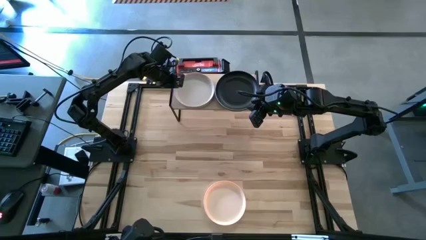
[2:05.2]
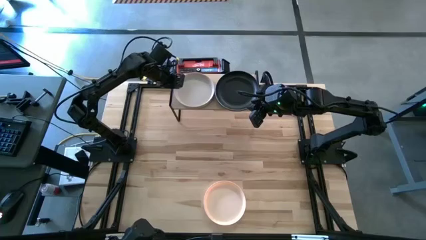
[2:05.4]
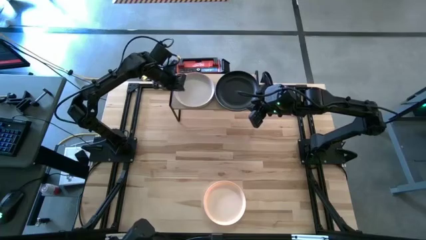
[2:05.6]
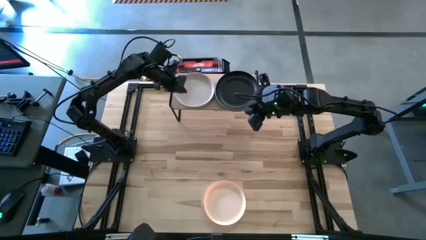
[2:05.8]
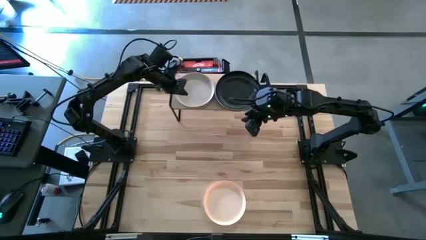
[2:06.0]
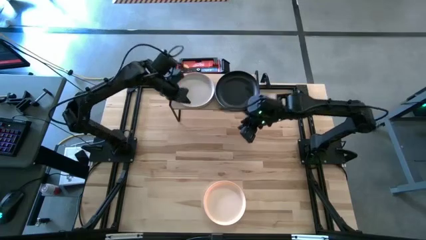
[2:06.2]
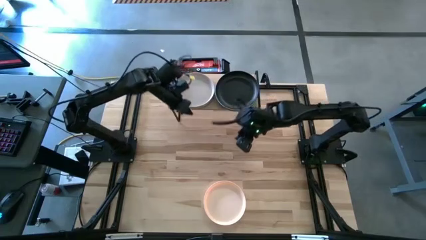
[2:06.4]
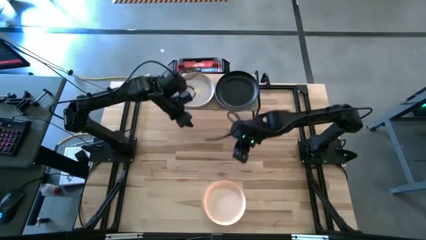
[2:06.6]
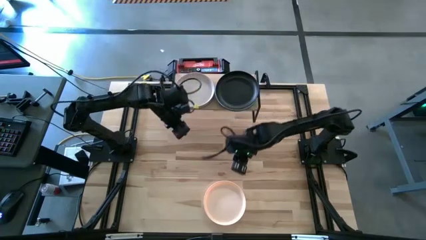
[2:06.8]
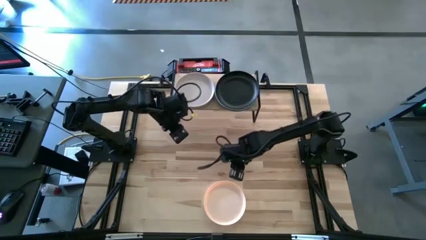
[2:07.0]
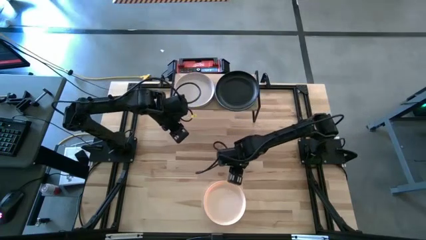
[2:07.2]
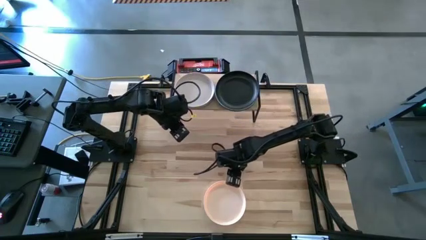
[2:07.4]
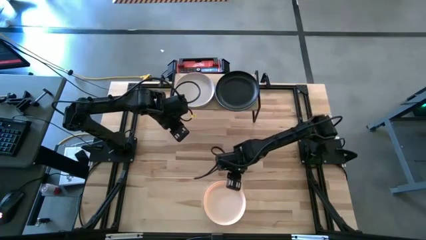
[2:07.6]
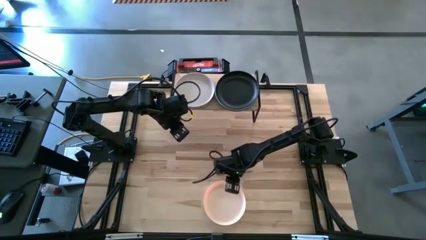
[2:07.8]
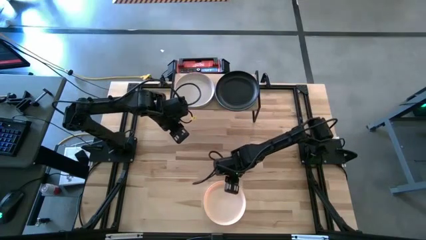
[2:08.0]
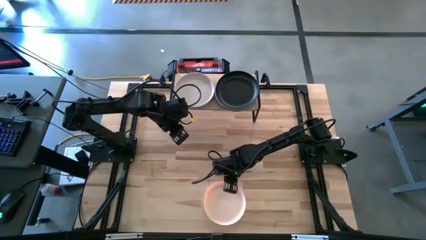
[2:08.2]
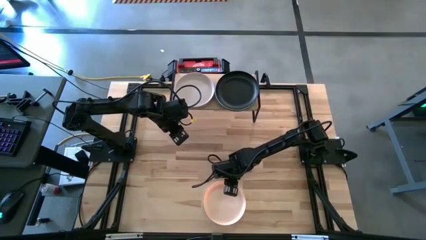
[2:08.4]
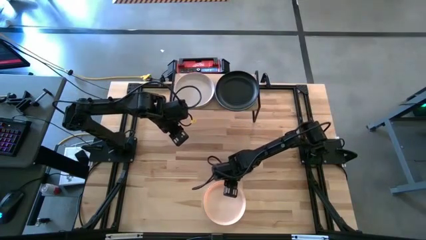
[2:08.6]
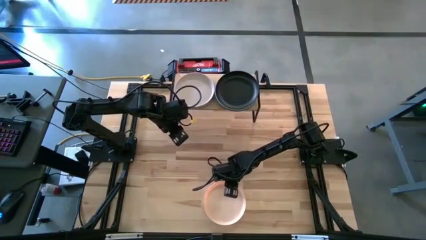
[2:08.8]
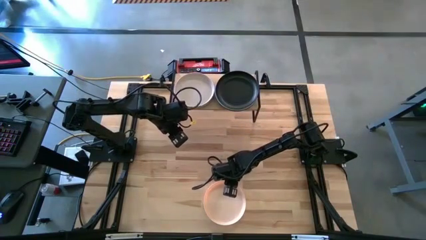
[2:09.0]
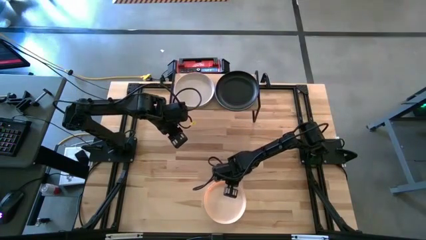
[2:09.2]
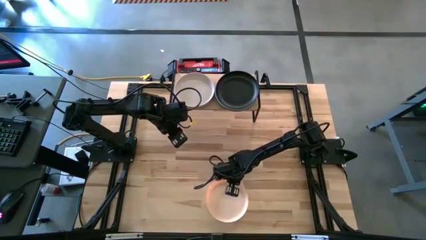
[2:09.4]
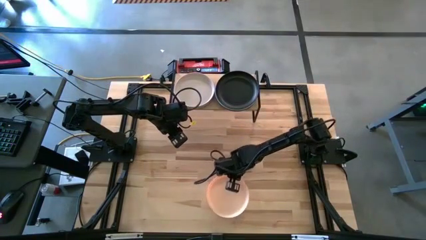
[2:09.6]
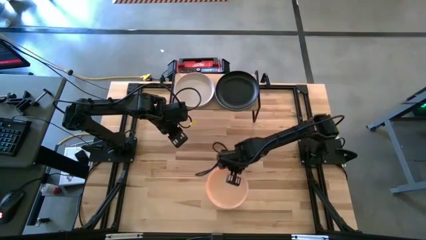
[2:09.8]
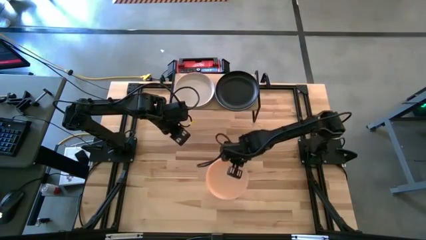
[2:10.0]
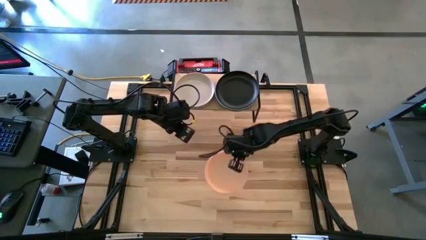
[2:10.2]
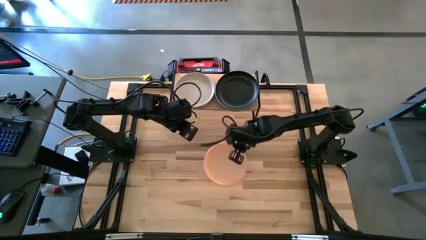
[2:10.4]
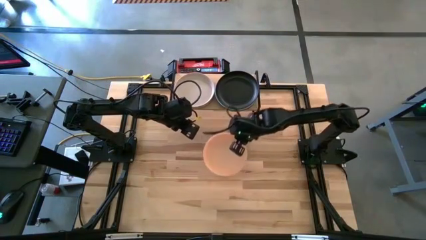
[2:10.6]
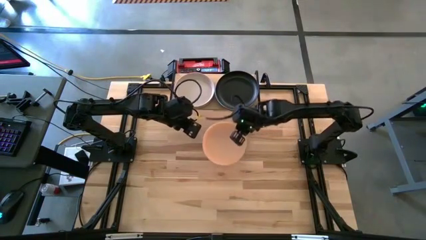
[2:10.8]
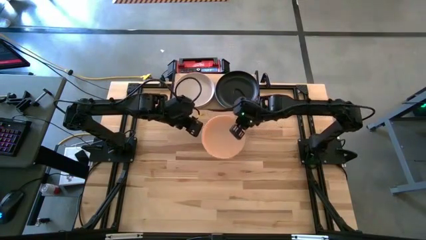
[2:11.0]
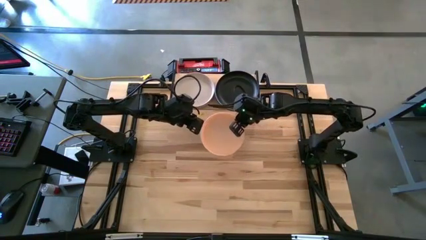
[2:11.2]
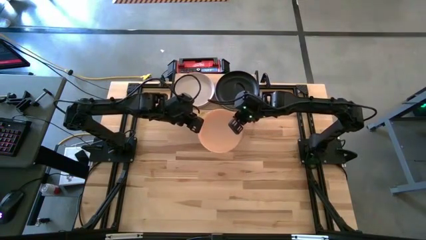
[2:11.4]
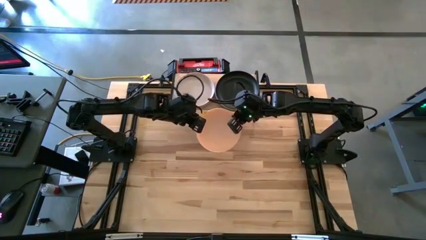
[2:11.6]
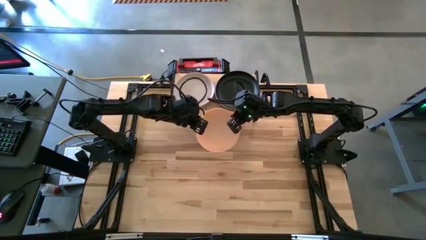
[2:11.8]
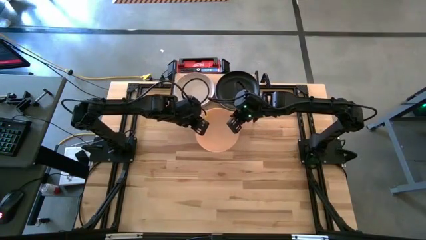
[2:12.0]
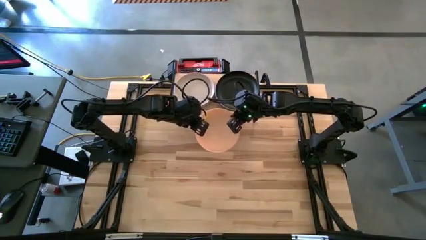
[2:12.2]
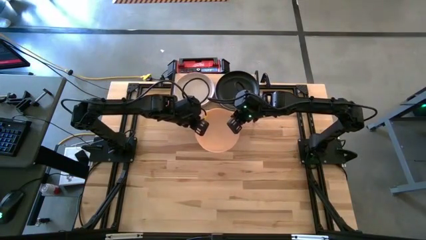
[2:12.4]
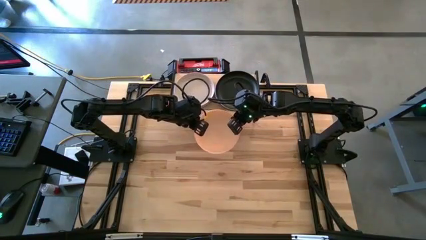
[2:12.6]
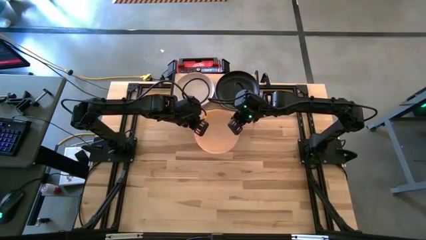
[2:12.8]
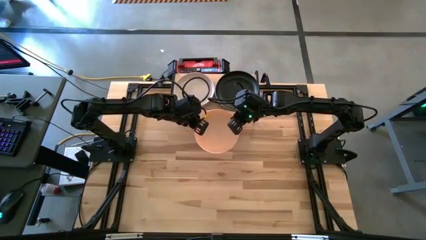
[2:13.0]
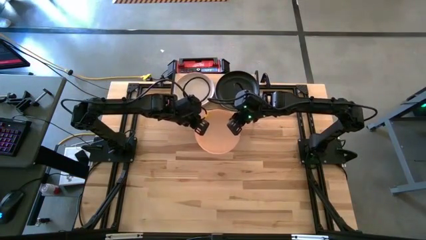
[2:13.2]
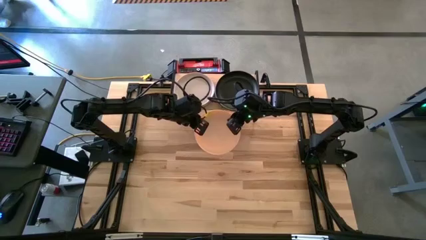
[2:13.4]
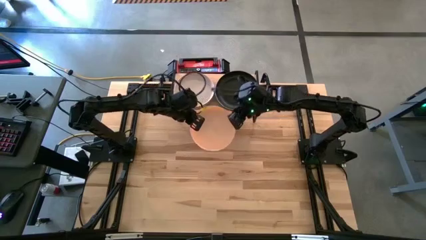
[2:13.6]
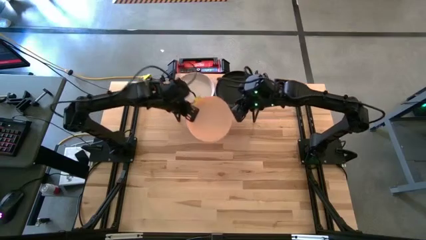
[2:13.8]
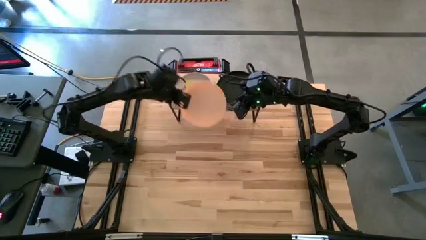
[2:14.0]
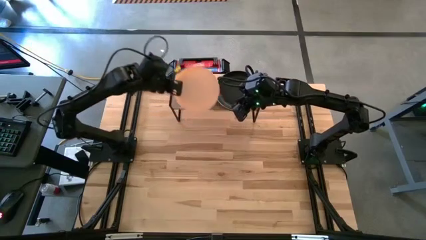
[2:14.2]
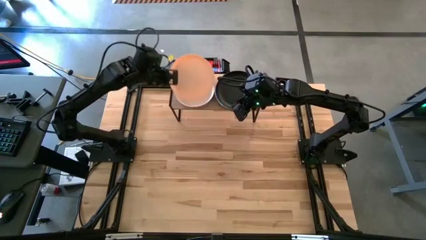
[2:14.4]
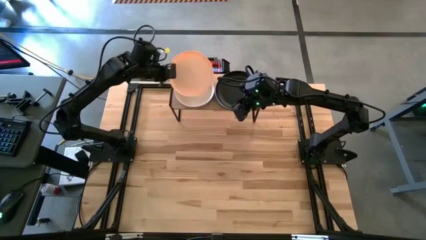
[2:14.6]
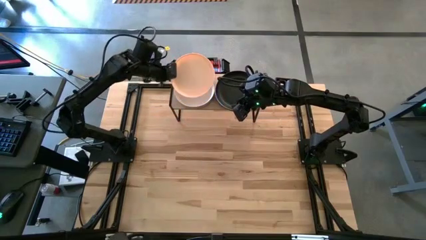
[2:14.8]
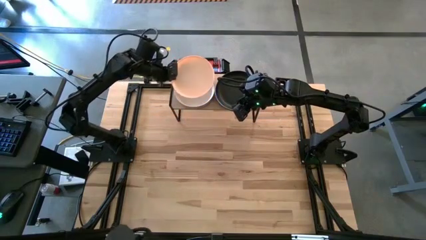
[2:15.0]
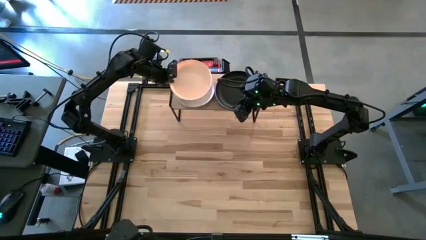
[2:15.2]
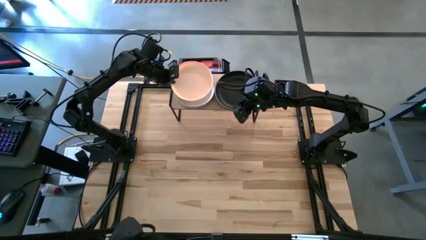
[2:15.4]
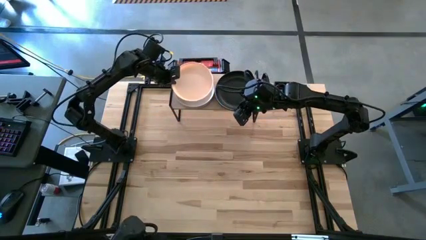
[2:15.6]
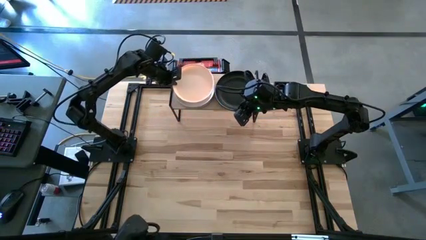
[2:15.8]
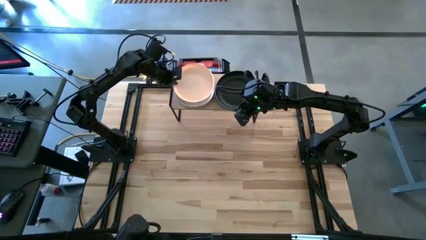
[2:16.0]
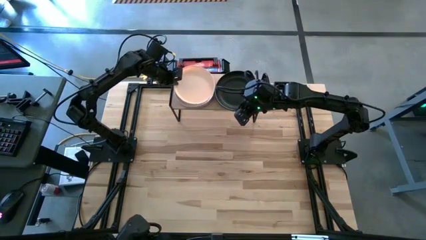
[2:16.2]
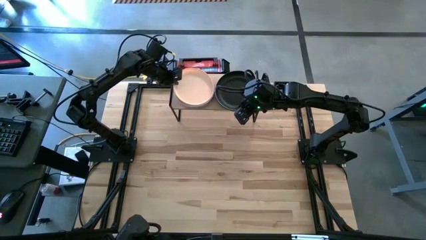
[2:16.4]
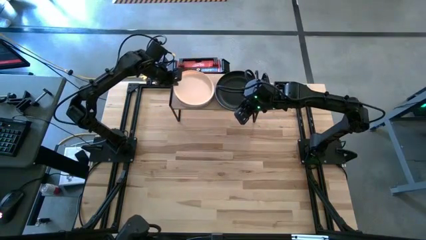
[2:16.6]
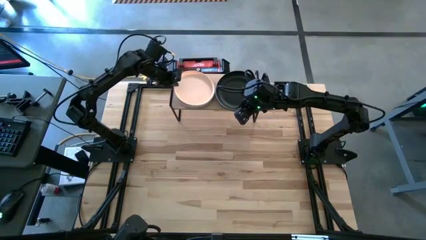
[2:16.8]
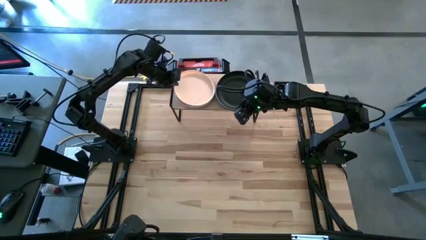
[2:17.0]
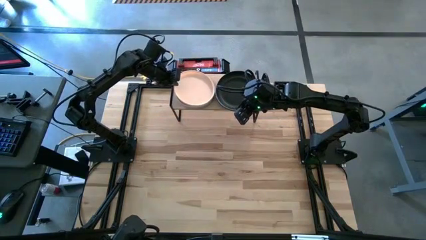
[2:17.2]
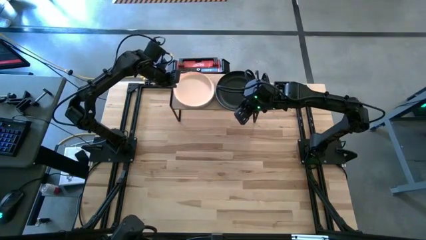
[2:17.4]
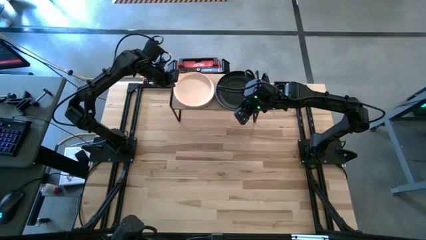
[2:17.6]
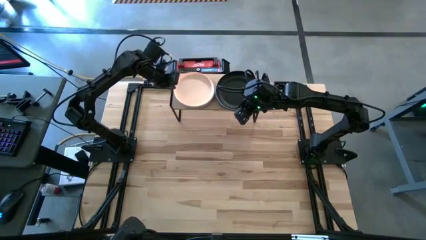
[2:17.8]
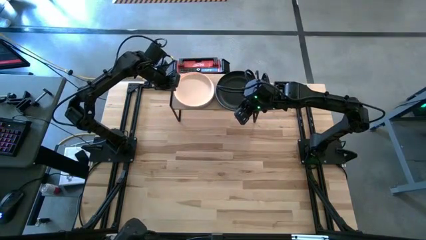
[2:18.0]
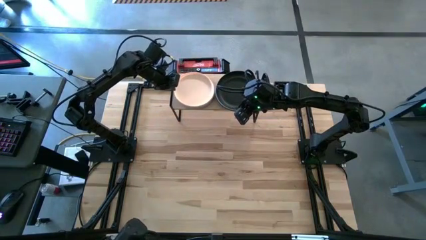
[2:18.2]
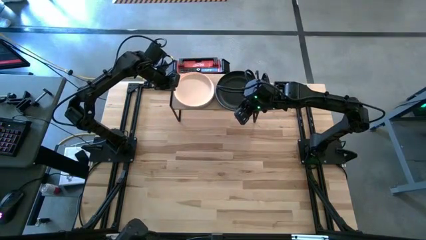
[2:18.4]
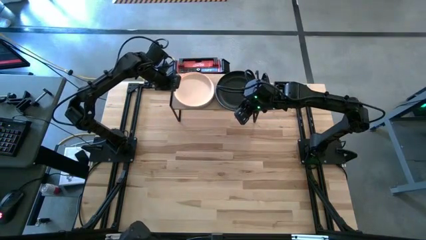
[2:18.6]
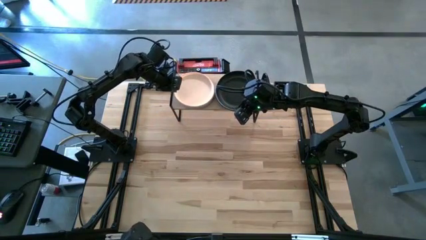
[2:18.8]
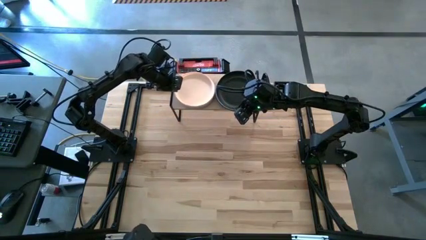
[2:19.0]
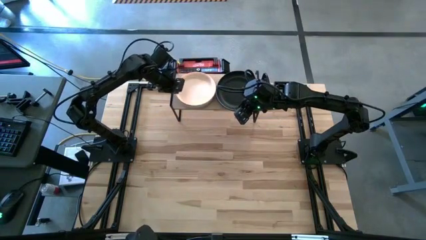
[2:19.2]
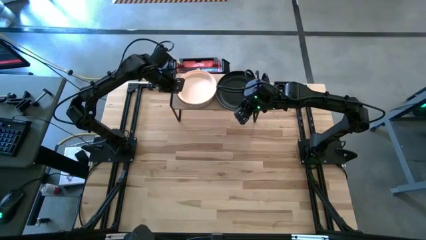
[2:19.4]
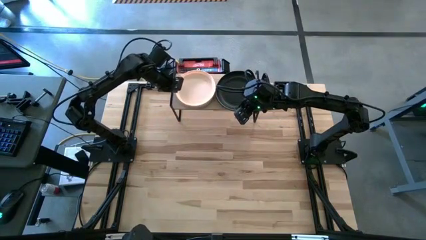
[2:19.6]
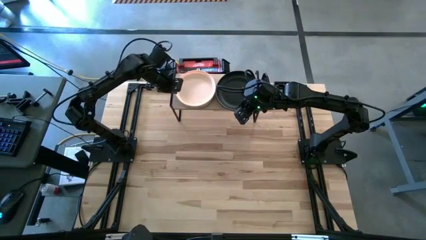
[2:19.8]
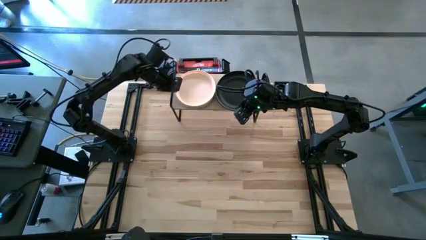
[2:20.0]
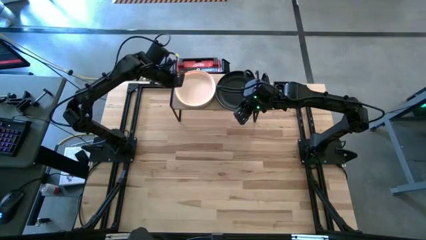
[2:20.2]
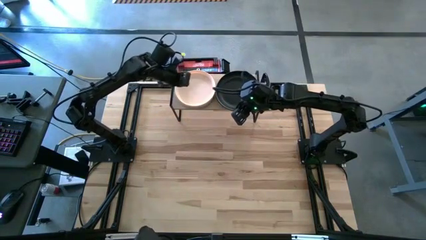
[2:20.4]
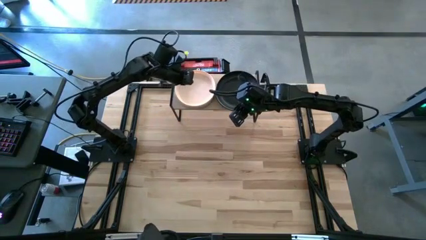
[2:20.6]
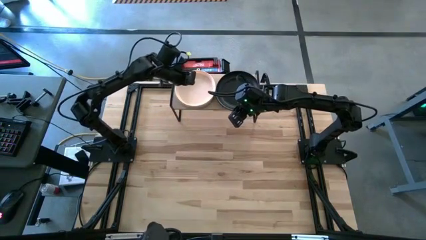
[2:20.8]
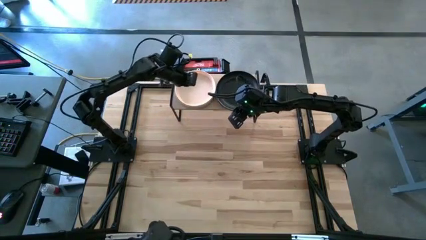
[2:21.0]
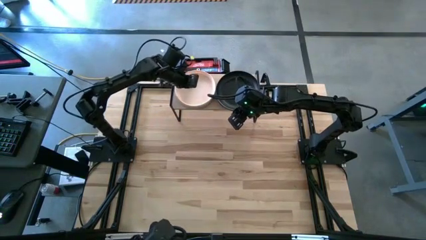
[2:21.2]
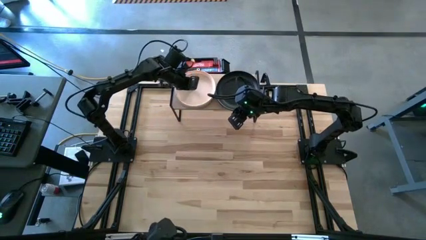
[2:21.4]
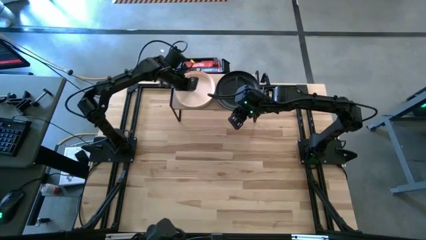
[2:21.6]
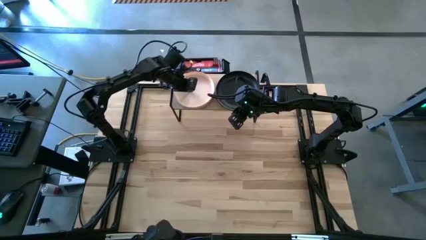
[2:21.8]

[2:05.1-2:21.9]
Task: Place and stack plates onto a shelf
Stack the light orange plate on the top of the white plate on the shelf
